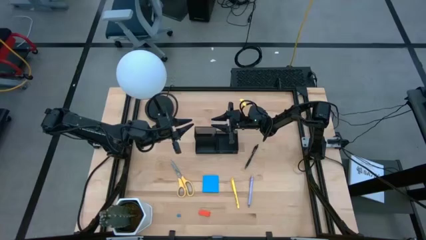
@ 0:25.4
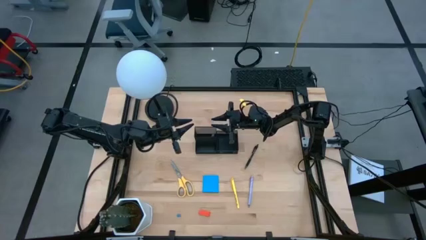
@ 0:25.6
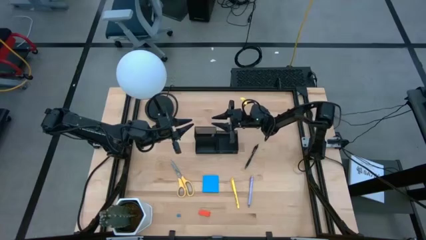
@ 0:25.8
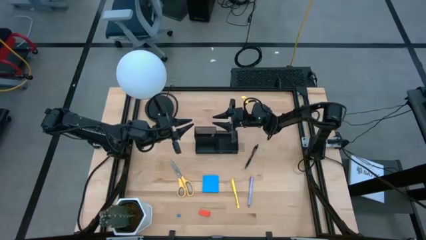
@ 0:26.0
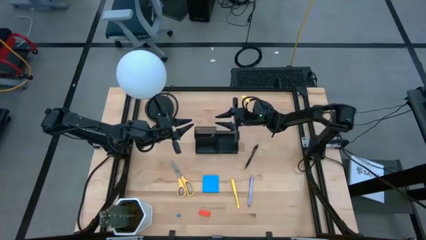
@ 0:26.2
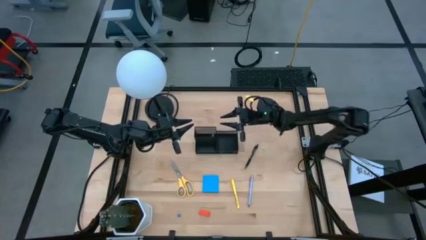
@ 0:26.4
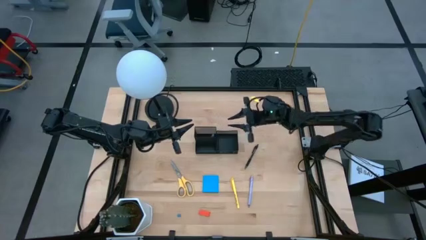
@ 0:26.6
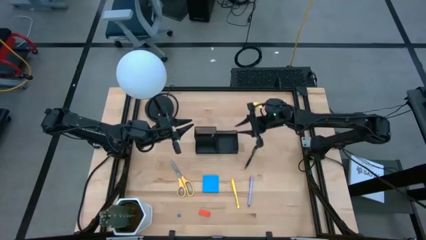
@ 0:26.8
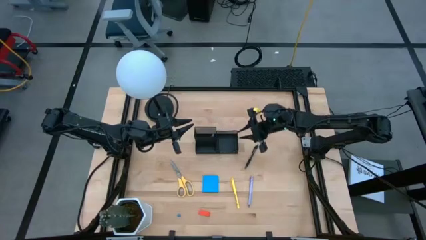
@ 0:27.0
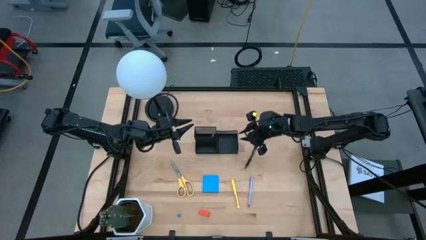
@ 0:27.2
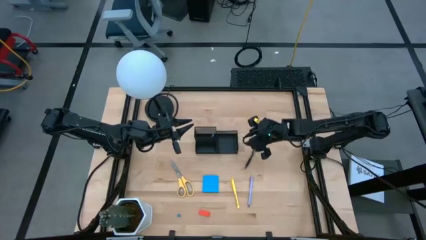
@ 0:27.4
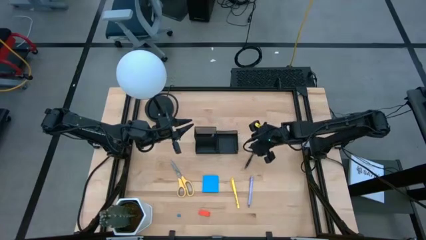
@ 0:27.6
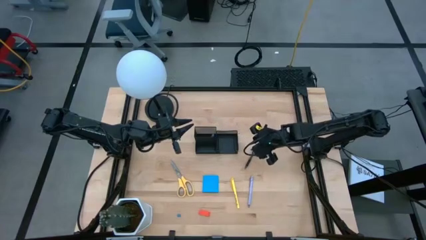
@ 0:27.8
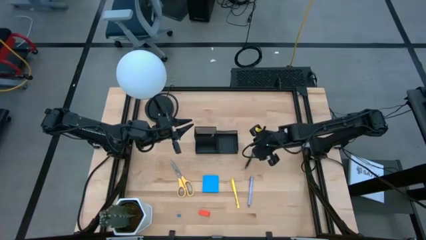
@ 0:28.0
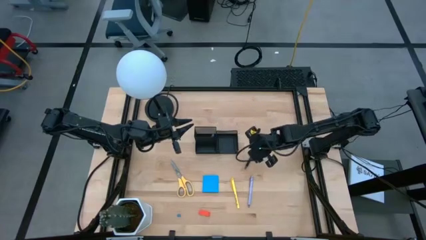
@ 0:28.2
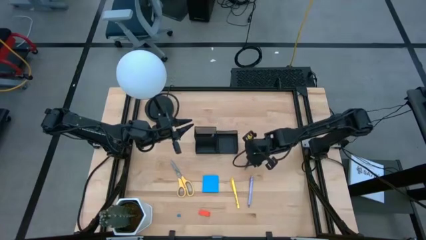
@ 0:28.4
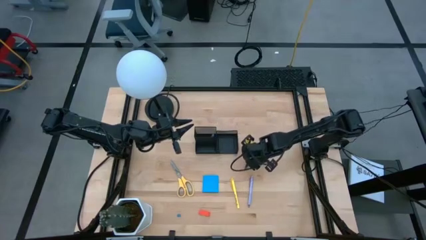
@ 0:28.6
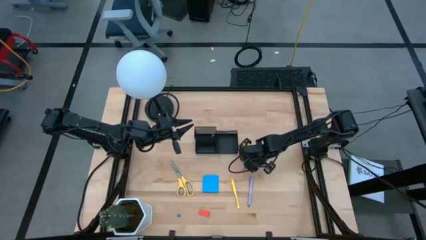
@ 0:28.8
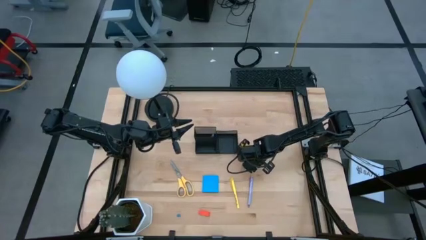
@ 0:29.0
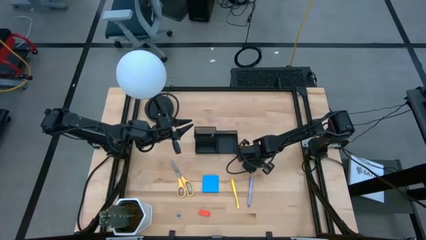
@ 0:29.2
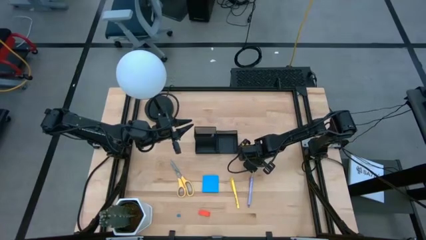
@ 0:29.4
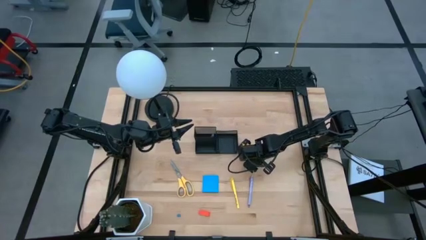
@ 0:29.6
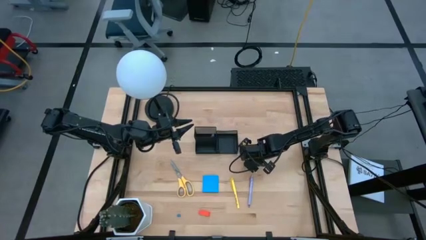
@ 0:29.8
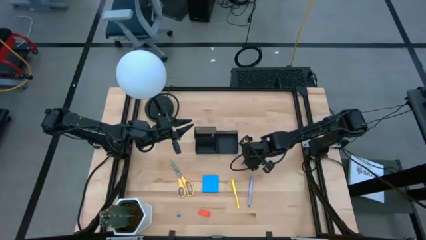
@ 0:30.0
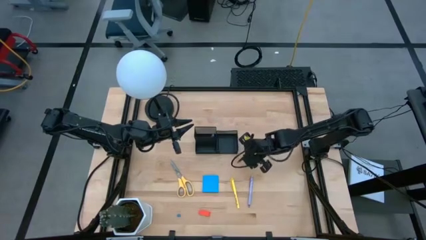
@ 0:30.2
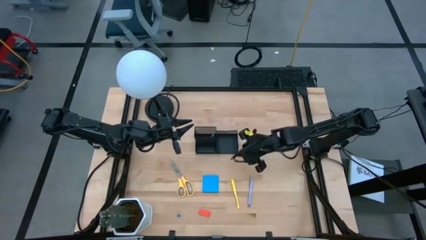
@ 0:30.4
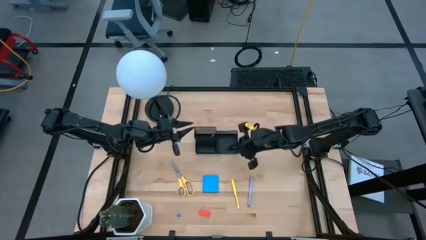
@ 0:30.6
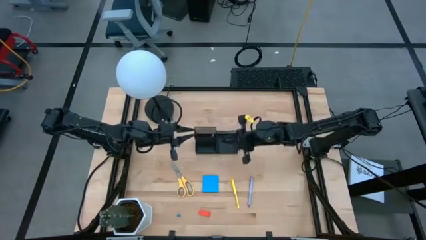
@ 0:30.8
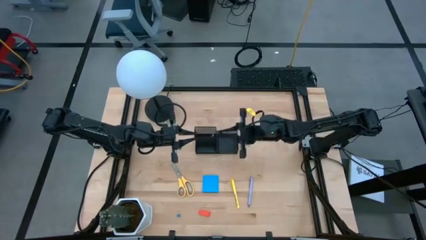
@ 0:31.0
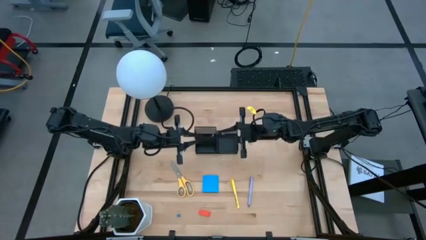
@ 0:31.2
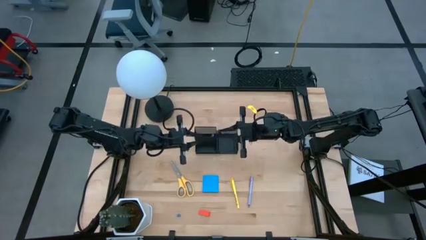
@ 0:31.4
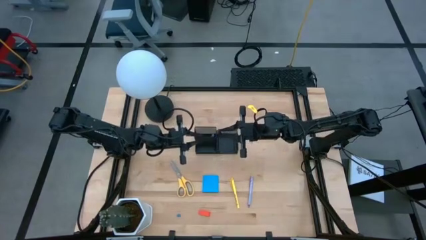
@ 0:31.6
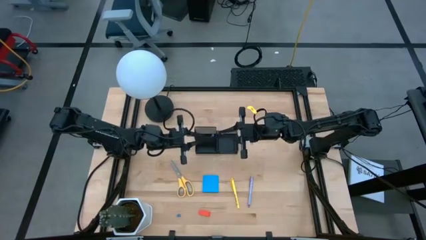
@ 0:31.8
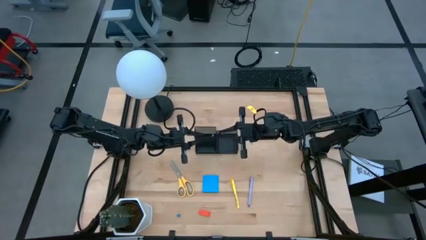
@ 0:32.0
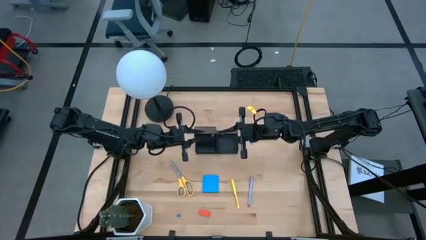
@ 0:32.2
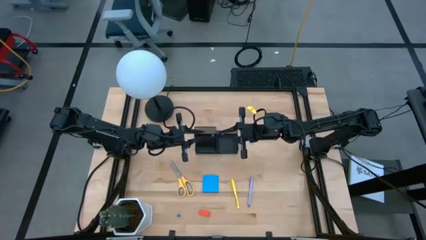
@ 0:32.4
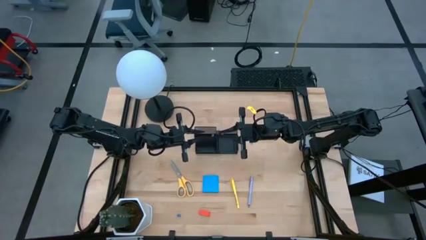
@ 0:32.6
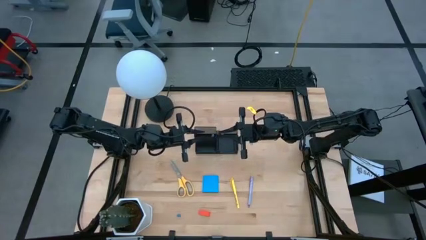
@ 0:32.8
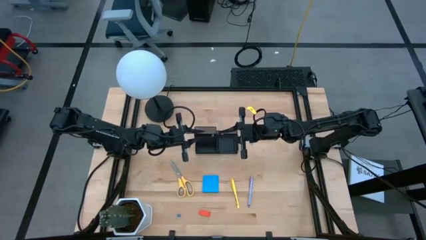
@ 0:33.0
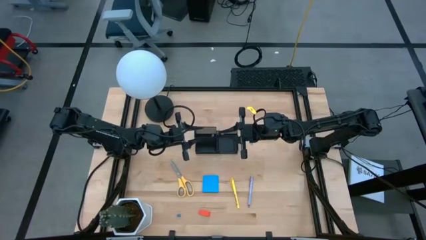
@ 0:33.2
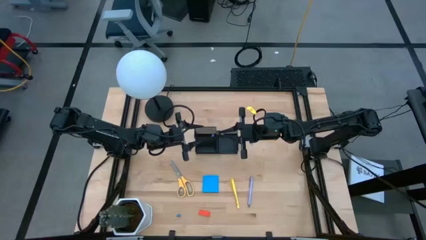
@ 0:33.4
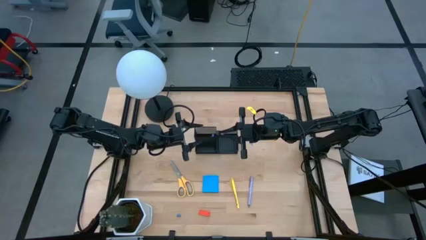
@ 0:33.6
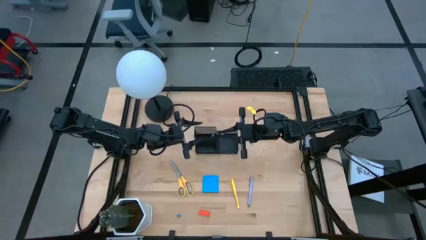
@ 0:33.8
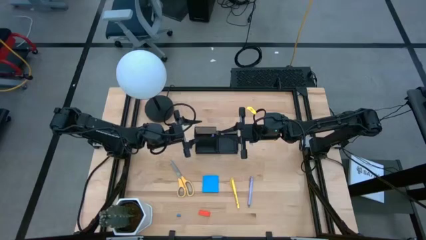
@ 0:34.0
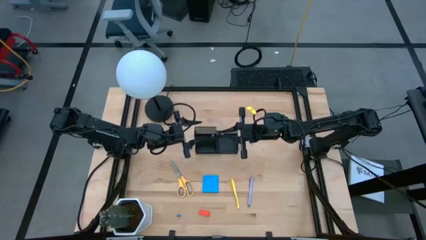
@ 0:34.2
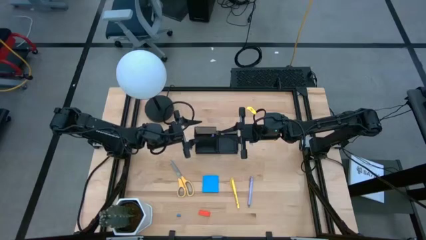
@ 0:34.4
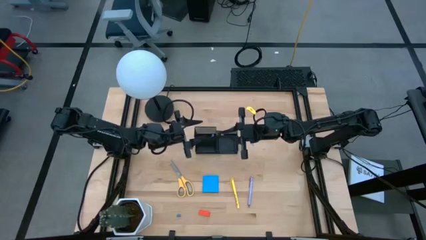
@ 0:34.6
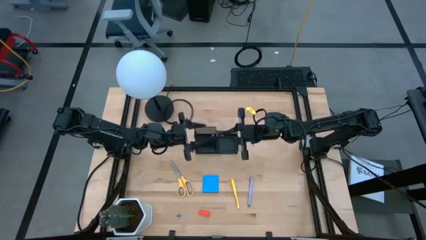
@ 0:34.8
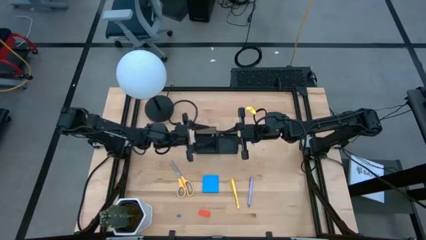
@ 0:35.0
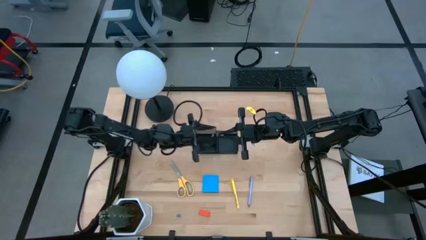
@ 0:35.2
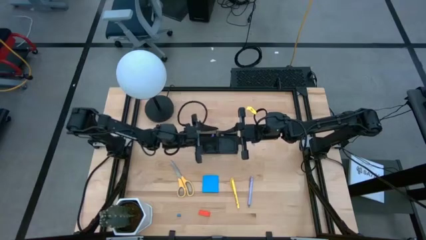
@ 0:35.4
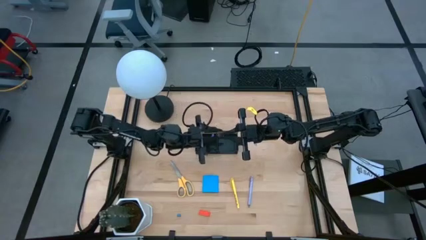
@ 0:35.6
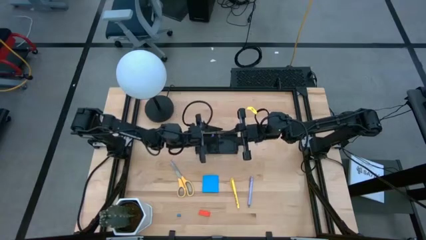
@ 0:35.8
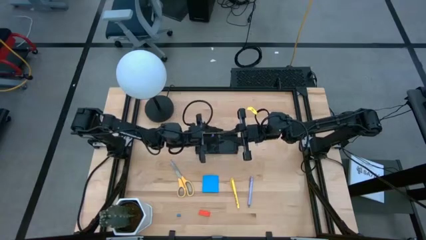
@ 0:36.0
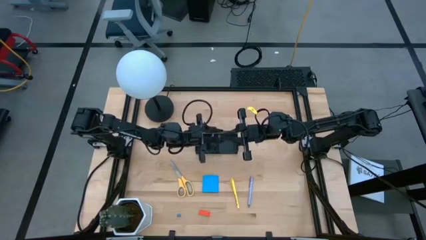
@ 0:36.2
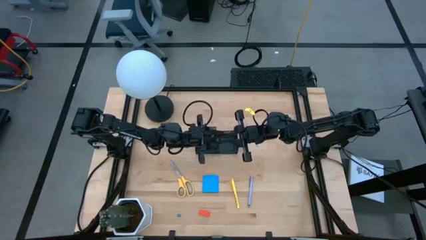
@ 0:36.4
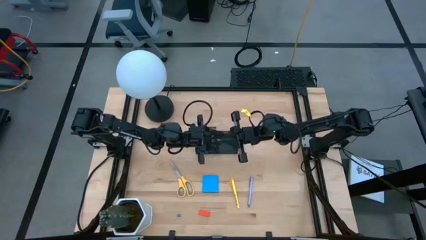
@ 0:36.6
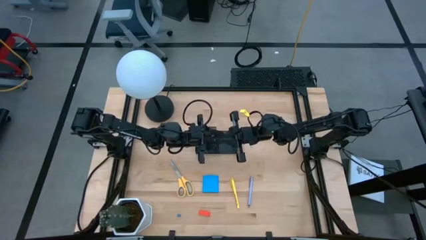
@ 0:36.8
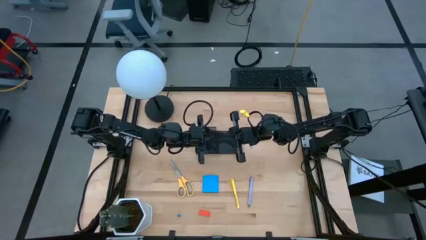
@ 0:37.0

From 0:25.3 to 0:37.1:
Task: Pick and place office supplies into organizer
Put the black pen into the desk organizer

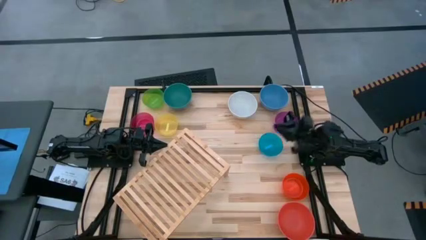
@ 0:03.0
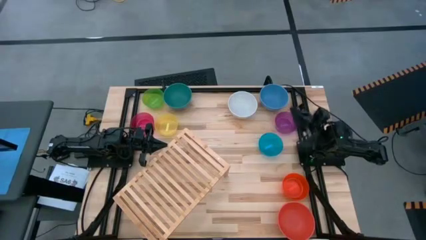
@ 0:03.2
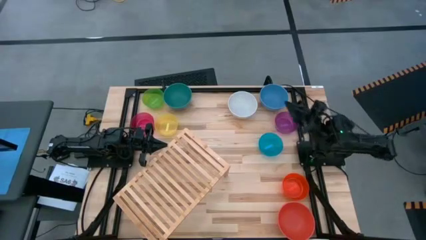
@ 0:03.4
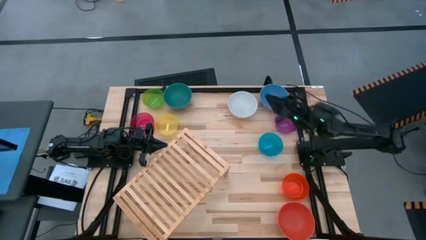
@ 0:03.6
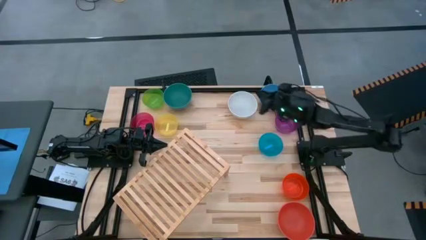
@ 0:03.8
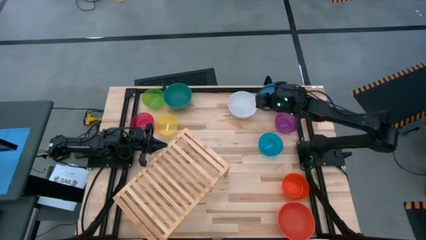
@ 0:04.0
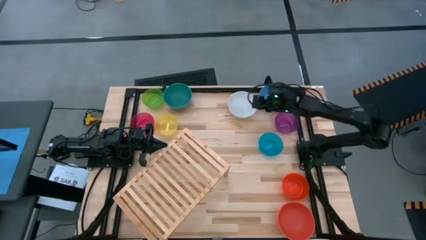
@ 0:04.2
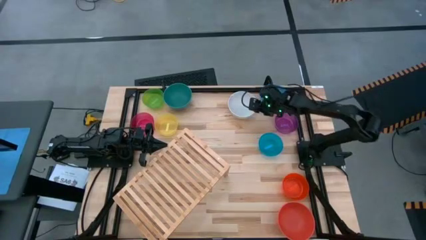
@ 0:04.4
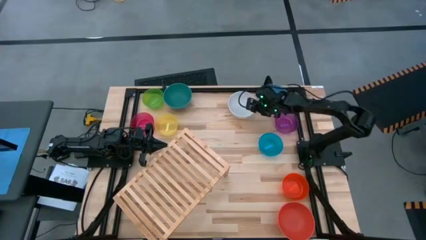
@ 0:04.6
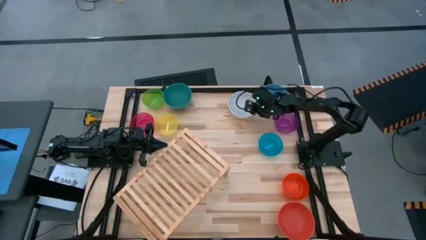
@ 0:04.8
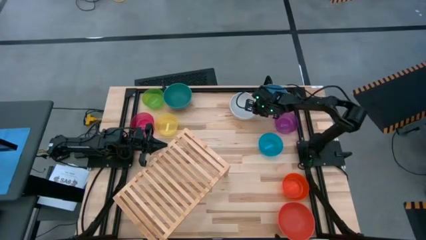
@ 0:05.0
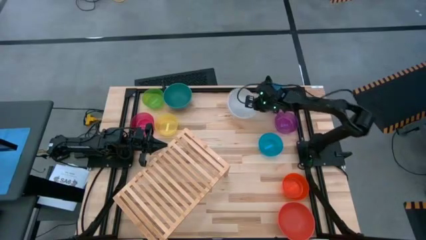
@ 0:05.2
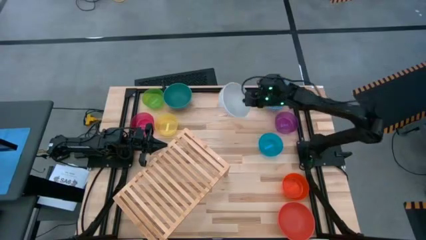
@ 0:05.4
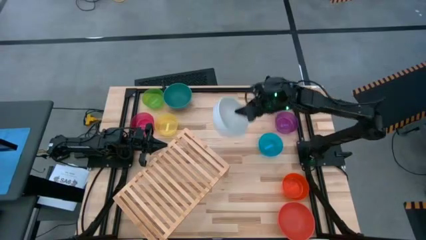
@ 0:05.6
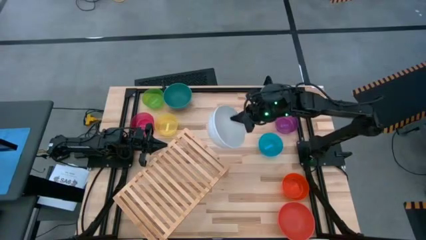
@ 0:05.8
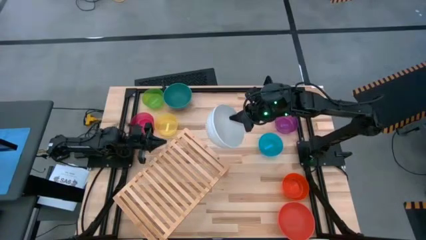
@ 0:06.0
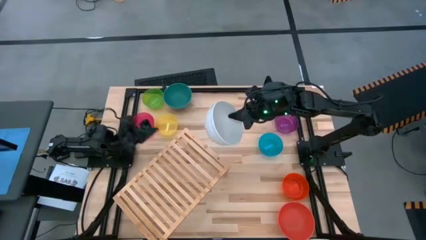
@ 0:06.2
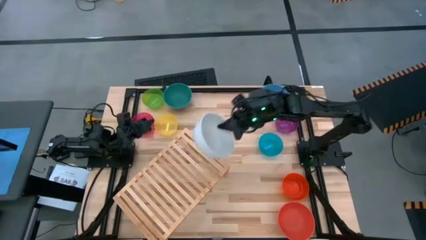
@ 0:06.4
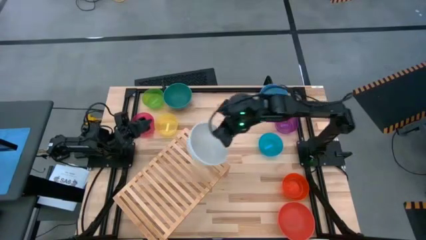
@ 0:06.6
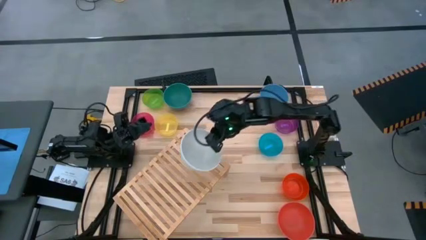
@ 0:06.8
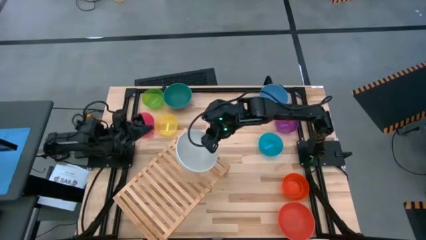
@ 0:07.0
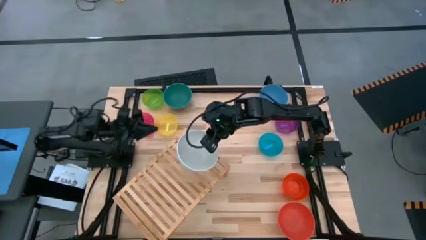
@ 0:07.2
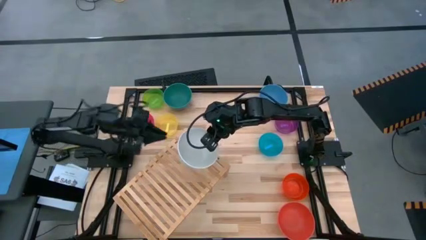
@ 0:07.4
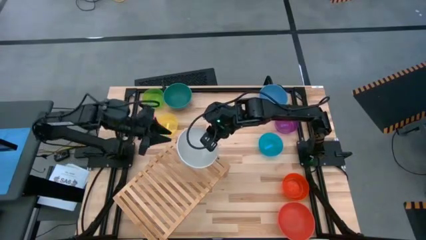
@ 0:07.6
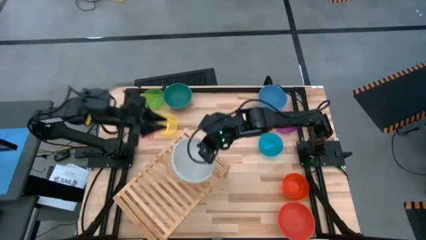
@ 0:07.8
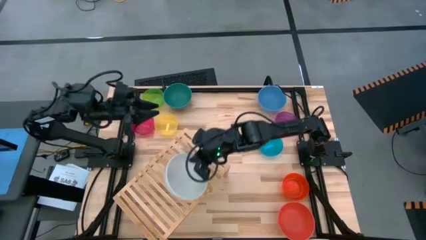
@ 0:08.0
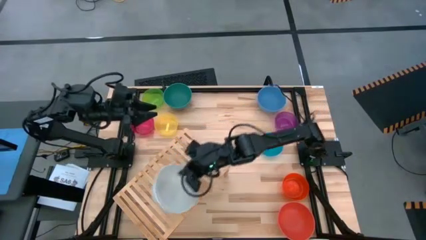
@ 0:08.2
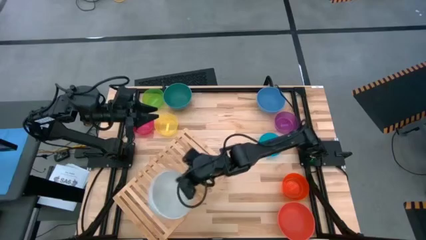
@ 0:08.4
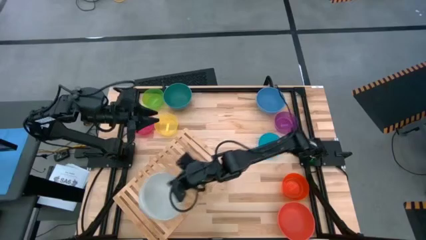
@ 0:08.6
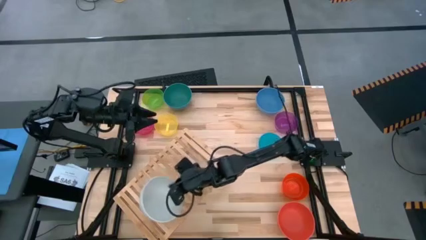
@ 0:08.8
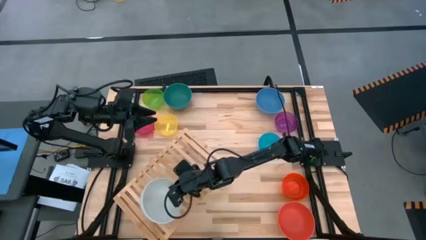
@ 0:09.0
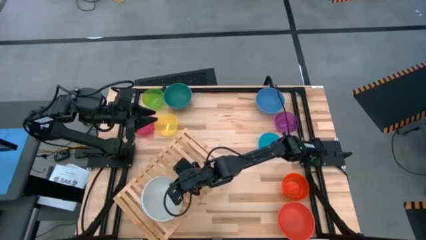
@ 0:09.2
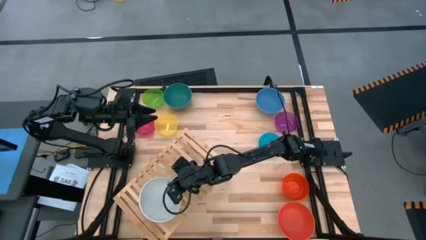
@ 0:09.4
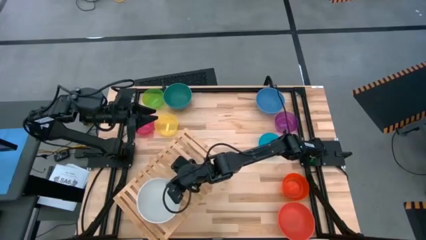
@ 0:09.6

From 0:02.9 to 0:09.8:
Task: Place and stack bowls onto a shelf
Put the large gray bowl on the shelf
